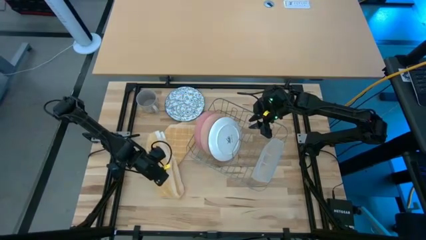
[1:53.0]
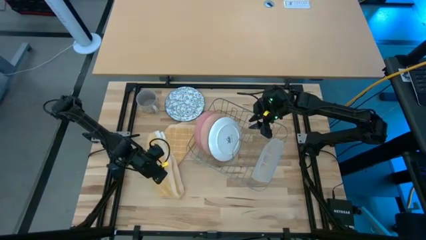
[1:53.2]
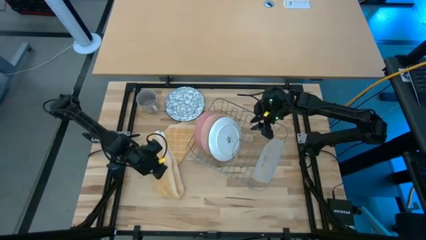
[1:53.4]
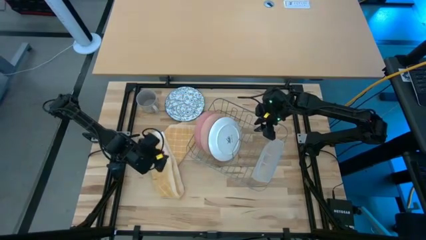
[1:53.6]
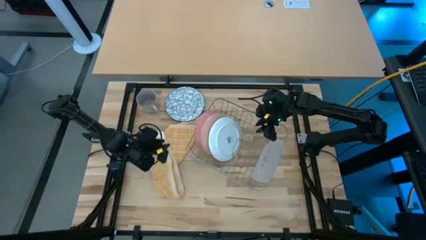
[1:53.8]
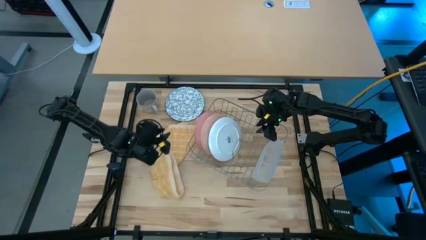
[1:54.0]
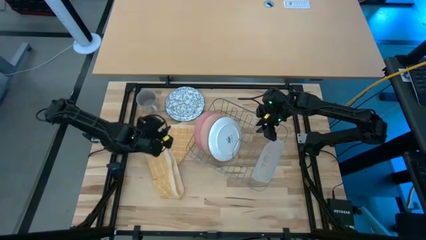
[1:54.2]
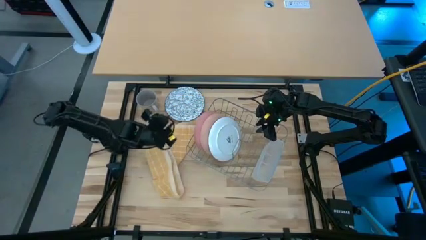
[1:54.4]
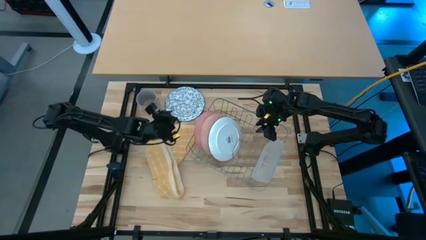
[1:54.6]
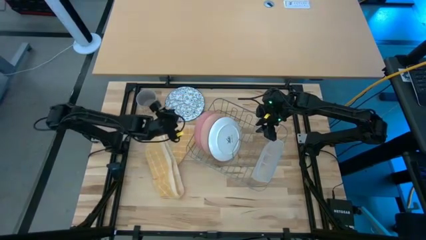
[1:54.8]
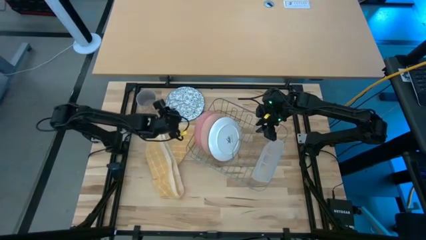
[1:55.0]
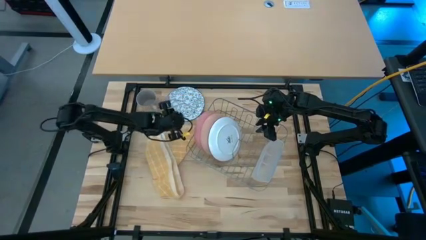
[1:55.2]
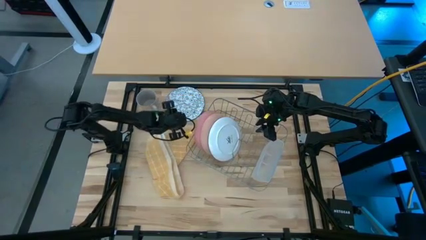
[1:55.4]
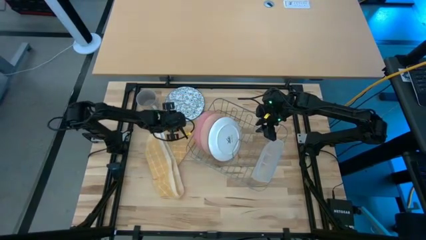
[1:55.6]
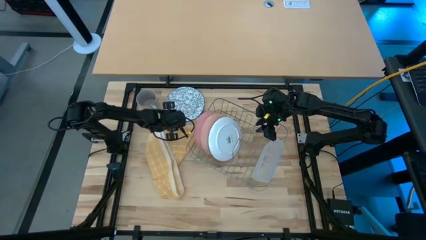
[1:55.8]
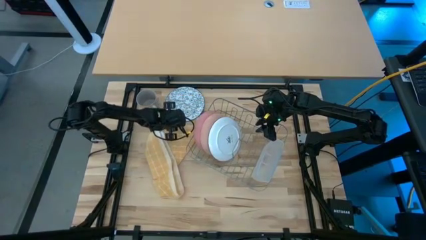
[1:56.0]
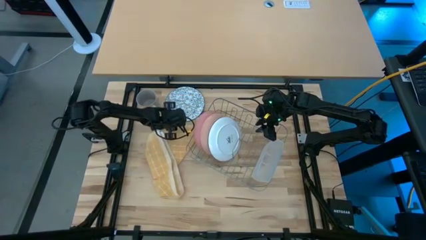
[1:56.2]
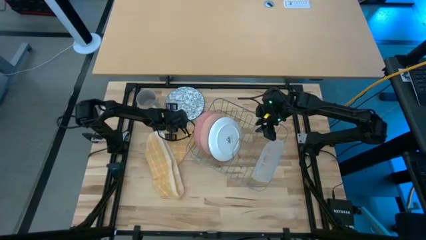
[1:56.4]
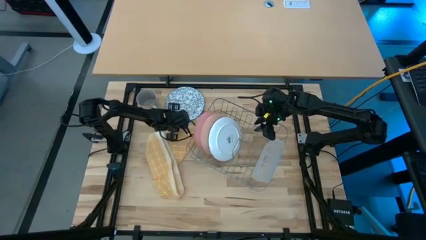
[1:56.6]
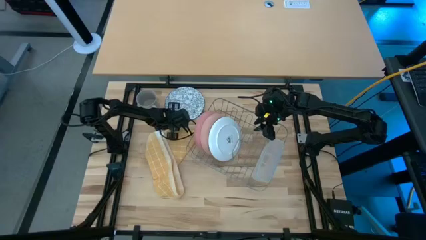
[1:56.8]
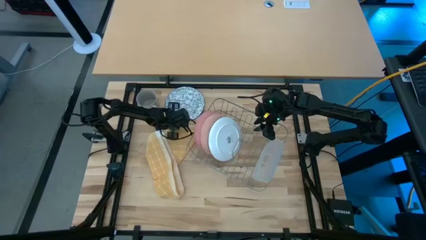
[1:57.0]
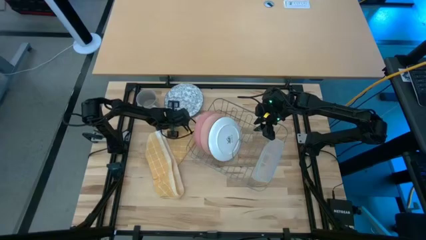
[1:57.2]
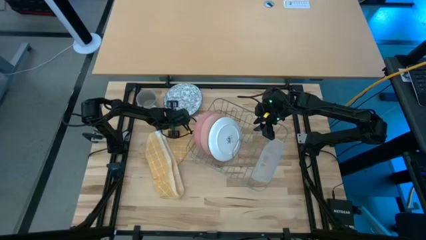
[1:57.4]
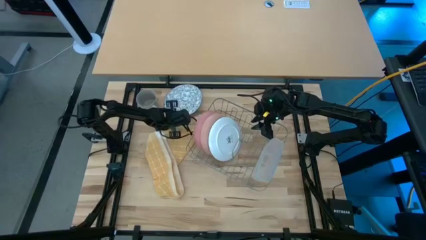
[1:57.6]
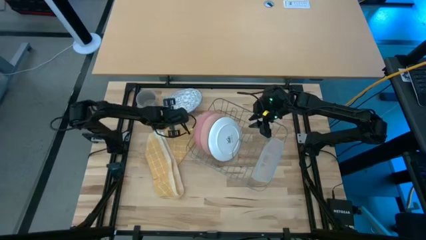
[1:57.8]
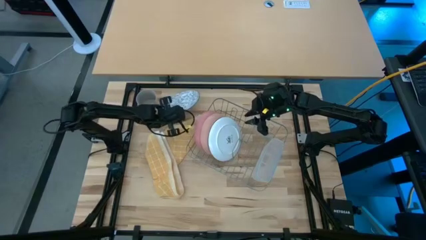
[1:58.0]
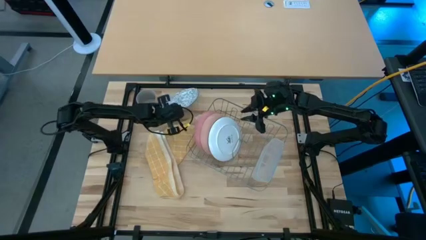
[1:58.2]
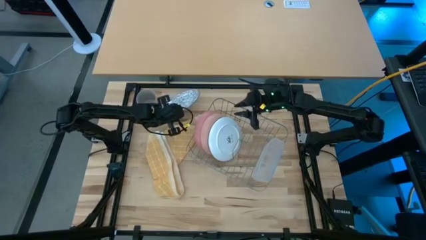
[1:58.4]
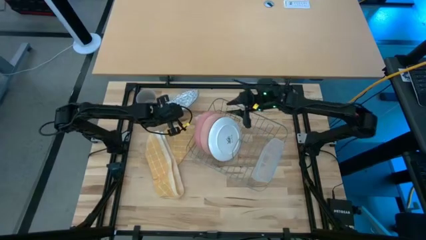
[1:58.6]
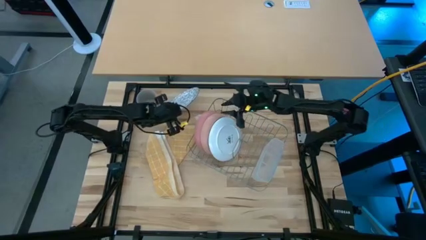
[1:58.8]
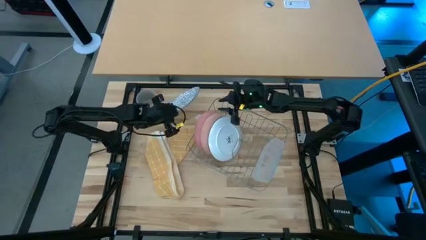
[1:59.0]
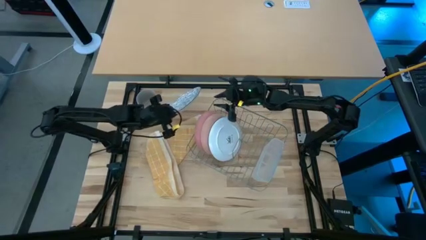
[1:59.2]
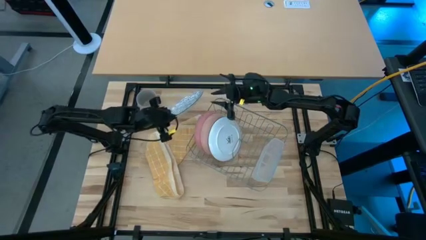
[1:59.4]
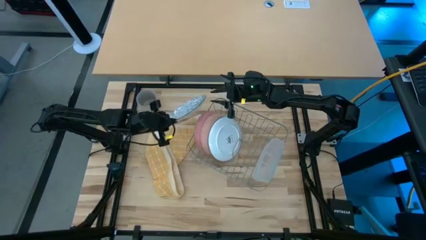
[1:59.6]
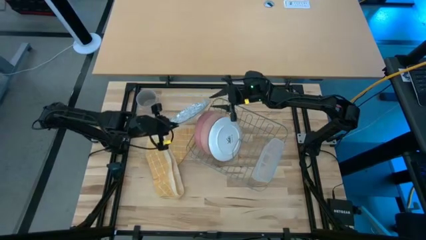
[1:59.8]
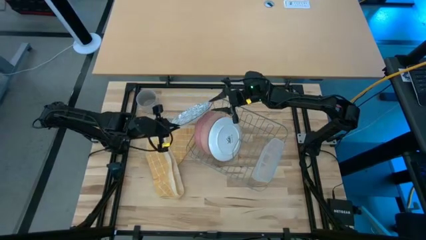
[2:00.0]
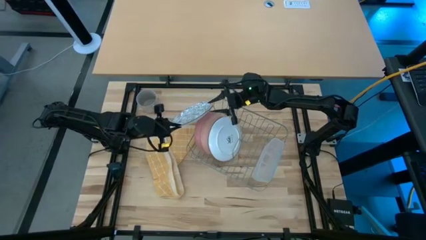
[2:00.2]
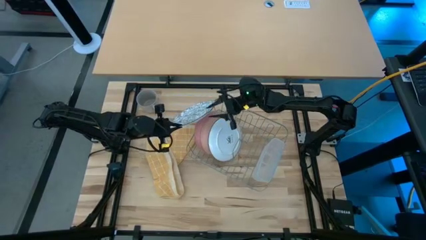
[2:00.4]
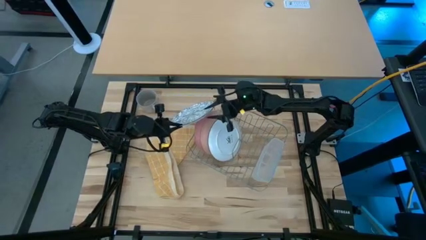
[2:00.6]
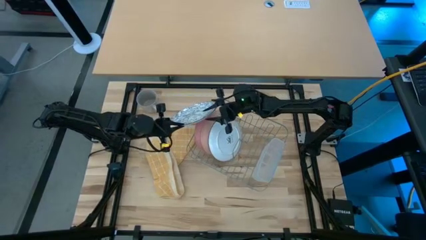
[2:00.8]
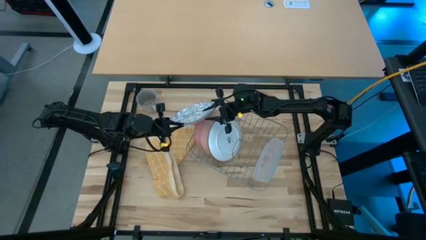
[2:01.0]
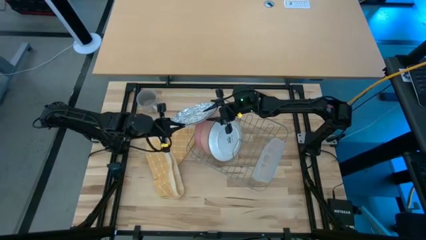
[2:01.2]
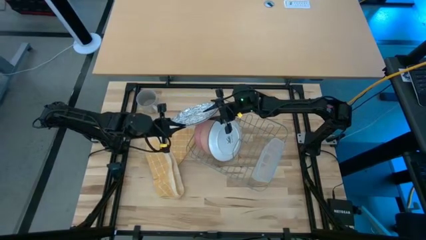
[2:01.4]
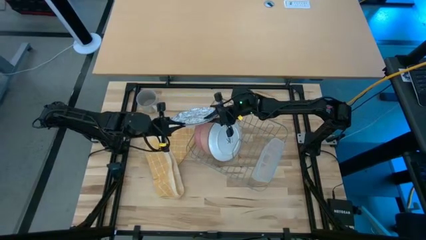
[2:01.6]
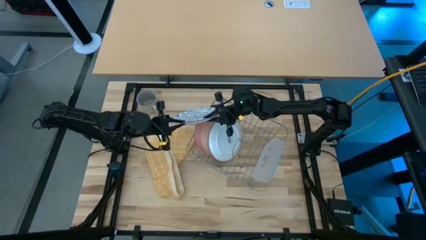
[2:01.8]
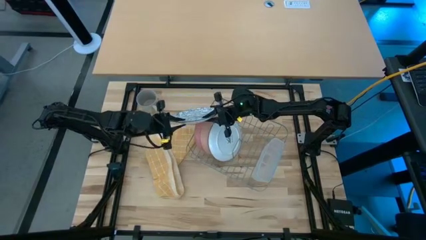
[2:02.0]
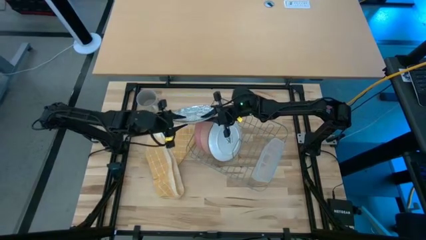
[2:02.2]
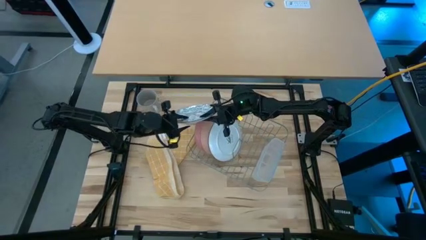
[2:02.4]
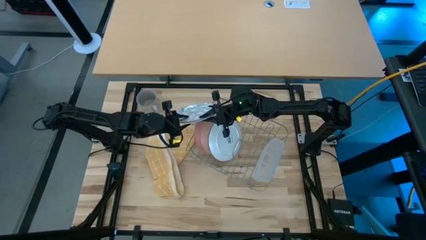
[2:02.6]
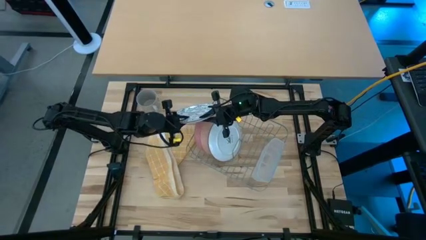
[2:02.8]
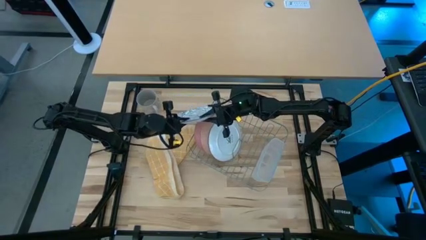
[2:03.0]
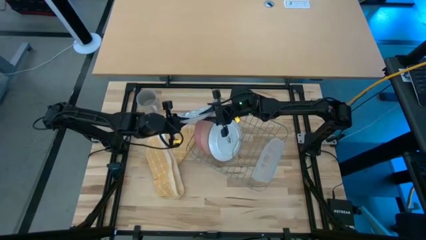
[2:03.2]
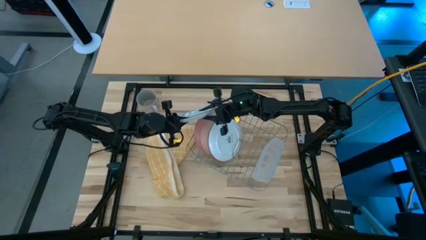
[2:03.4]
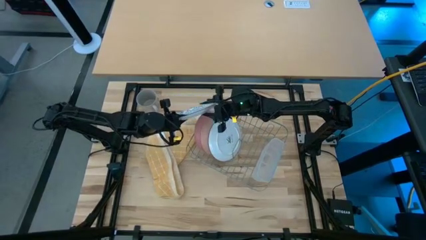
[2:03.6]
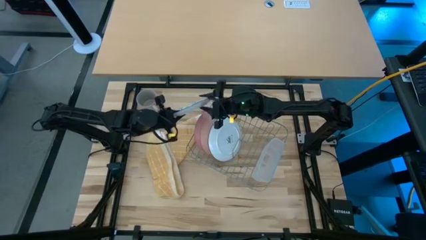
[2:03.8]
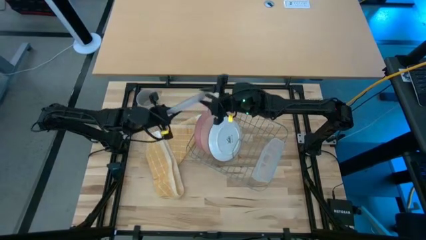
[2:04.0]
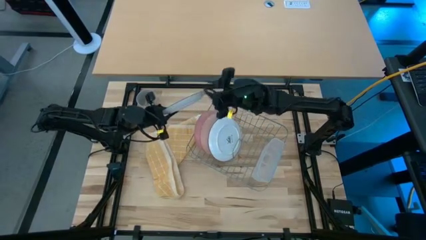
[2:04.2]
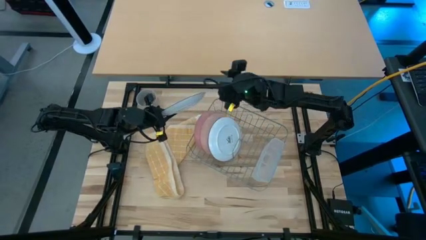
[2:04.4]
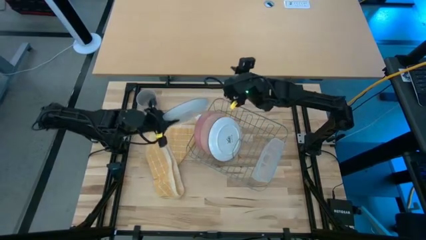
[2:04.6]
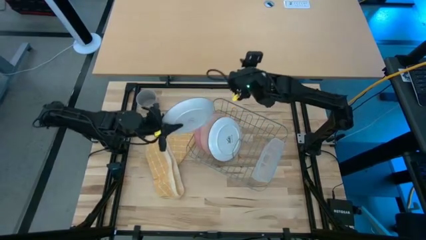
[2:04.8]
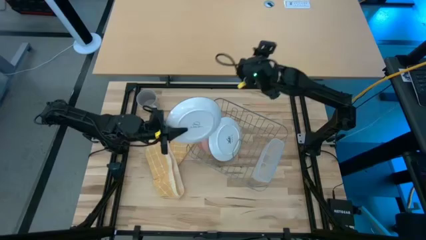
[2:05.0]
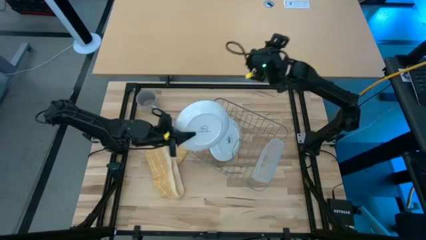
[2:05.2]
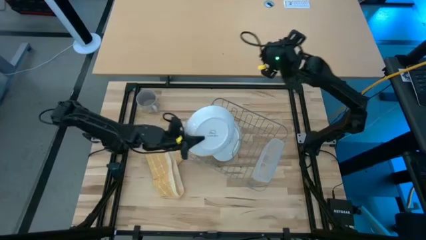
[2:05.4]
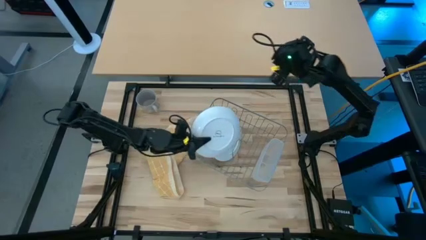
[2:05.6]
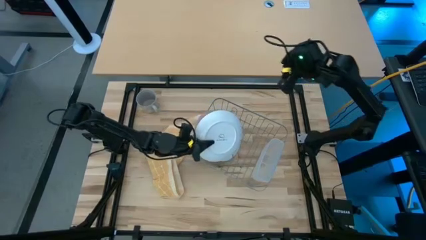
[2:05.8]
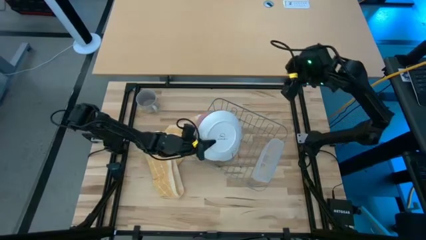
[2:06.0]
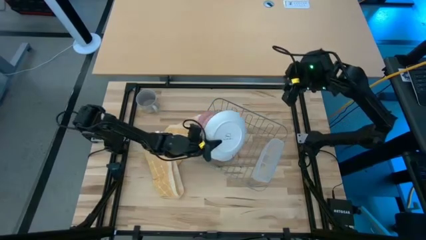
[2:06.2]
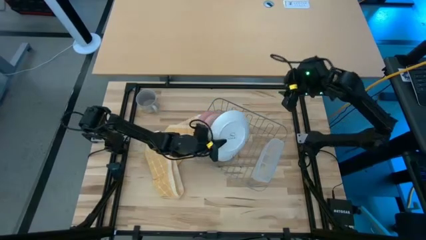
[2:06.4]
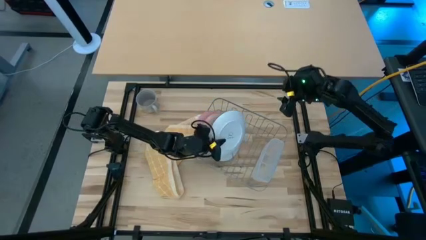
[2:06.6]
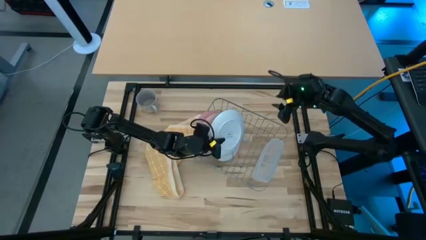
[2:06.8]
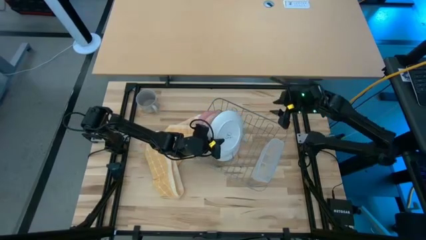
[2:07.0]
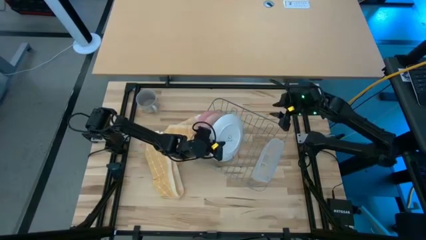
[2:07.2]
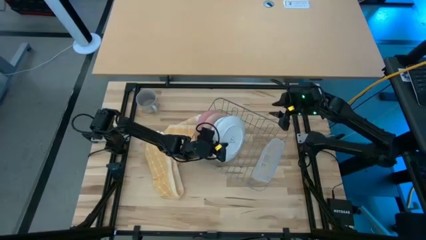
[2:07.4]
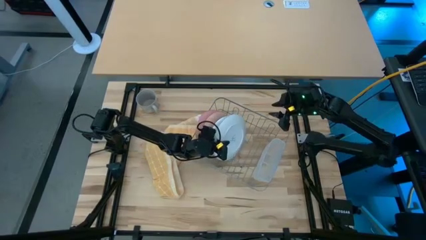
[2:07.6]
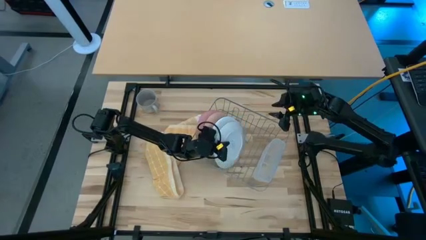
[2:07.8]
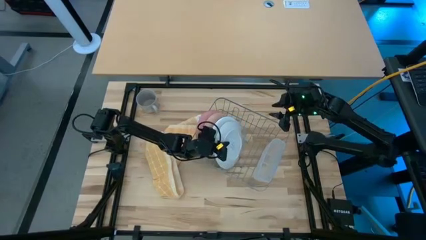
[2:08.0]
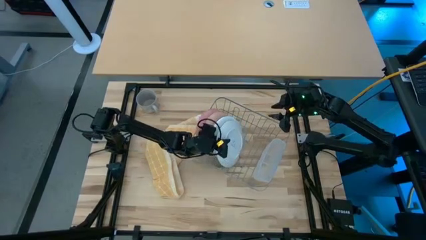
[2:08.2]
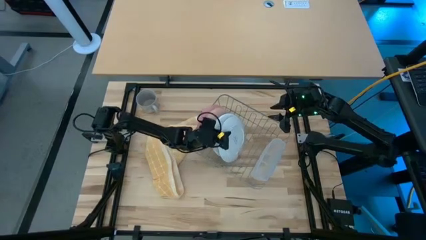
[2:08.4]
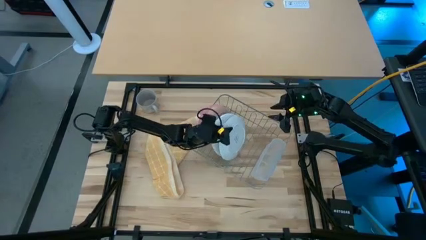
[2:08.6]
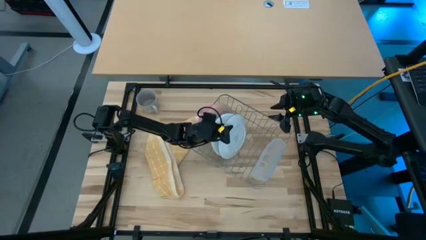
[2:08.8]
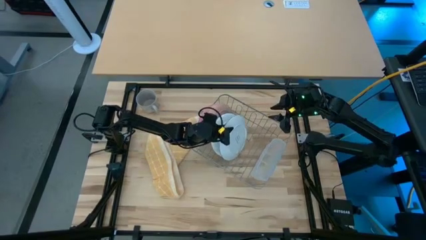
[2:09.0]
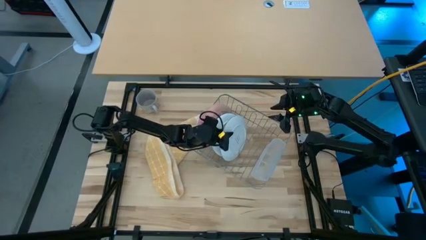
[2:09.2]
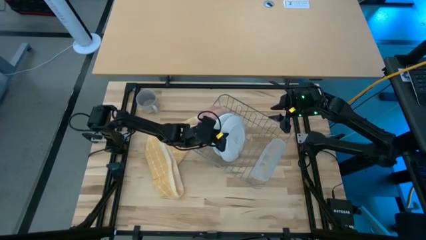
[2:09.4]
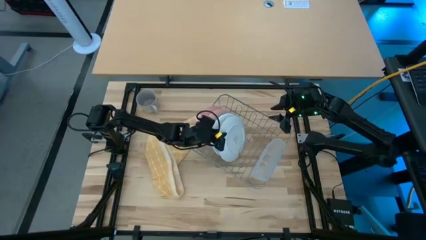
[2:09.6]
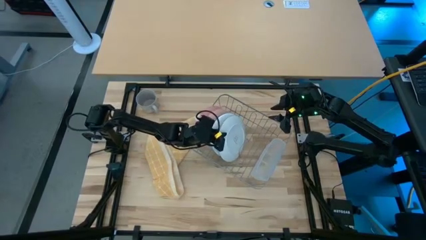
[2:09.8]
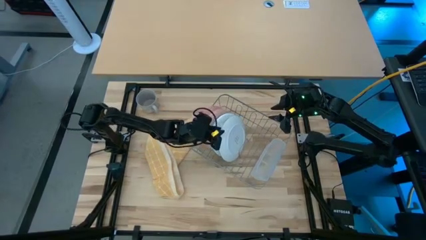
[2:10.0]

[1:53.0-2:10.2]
Task: Sort dishes
Put the blue patterned white plate into the dish rack
